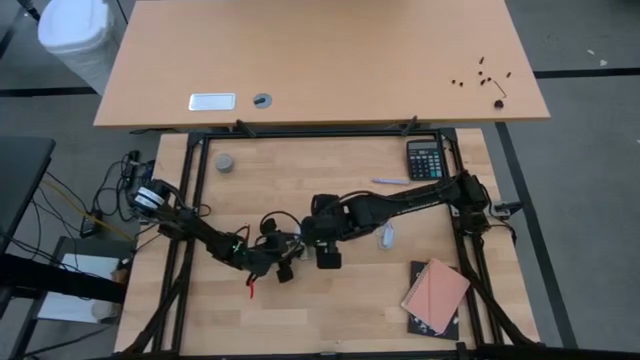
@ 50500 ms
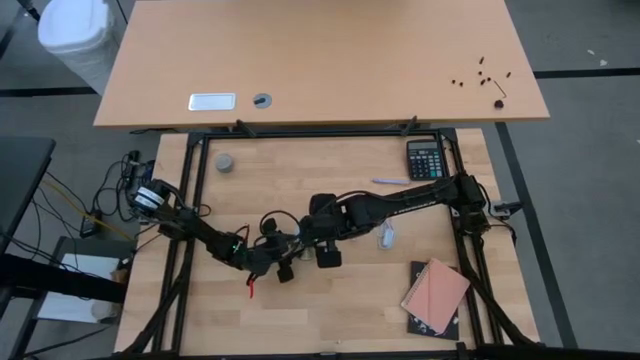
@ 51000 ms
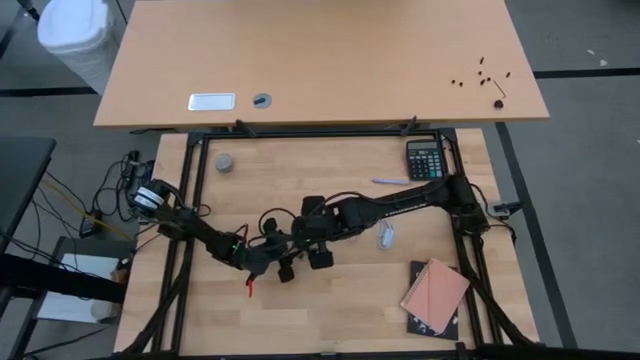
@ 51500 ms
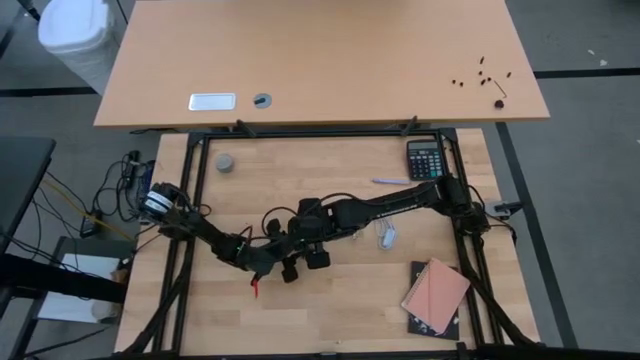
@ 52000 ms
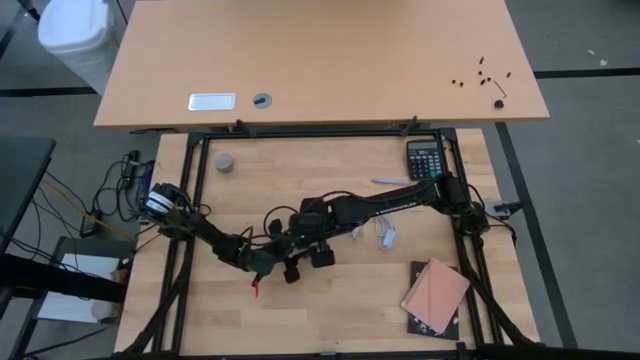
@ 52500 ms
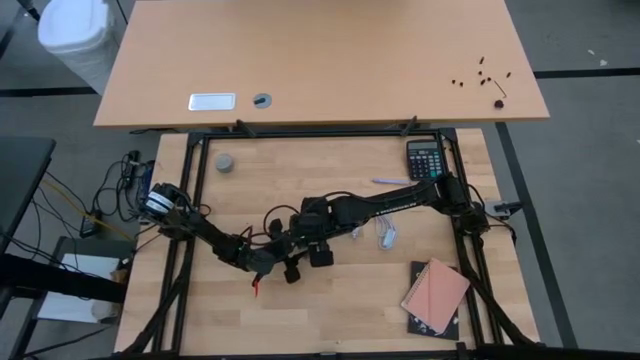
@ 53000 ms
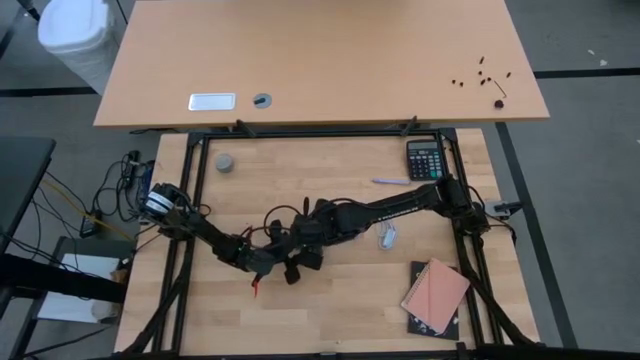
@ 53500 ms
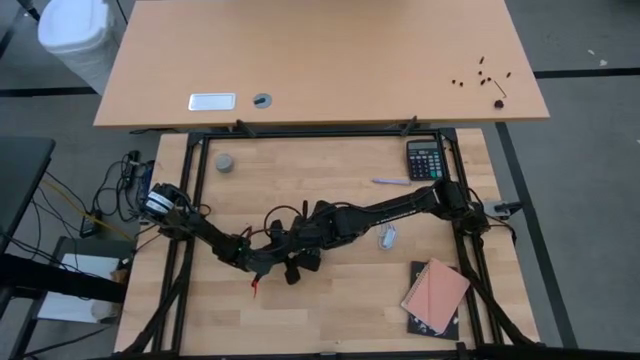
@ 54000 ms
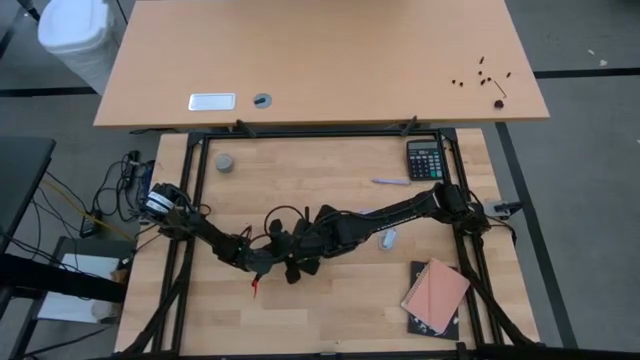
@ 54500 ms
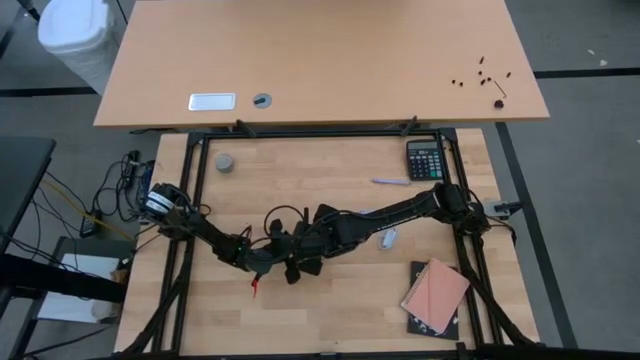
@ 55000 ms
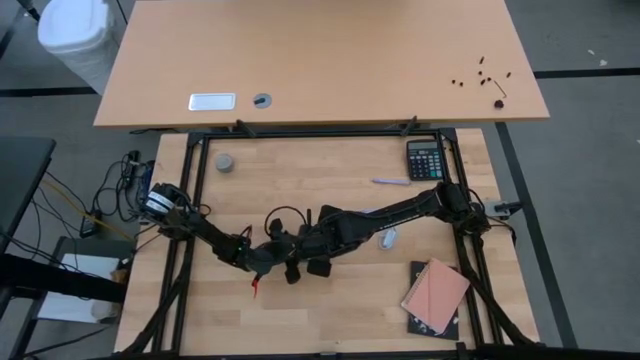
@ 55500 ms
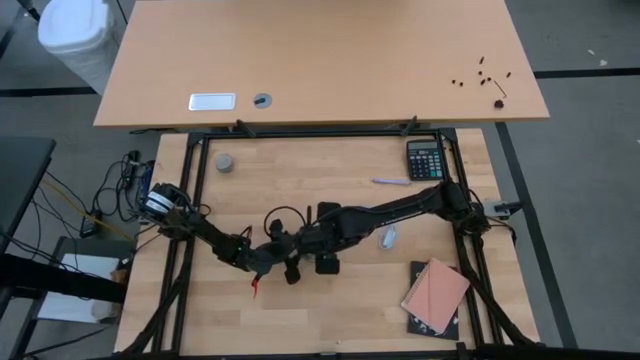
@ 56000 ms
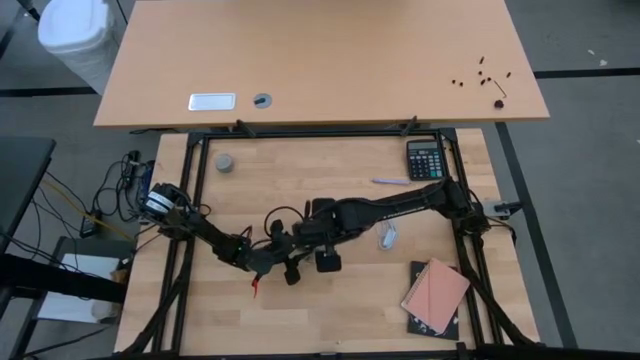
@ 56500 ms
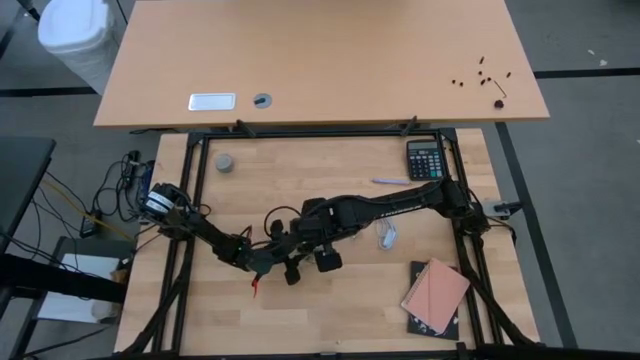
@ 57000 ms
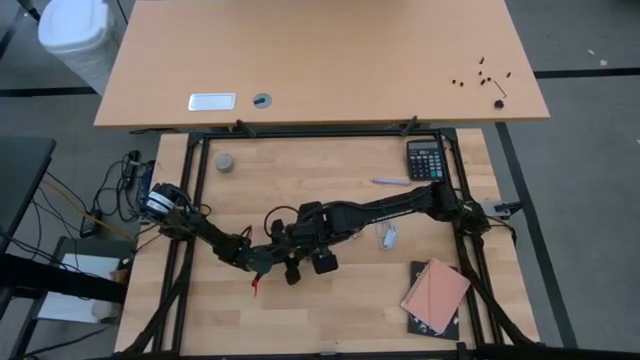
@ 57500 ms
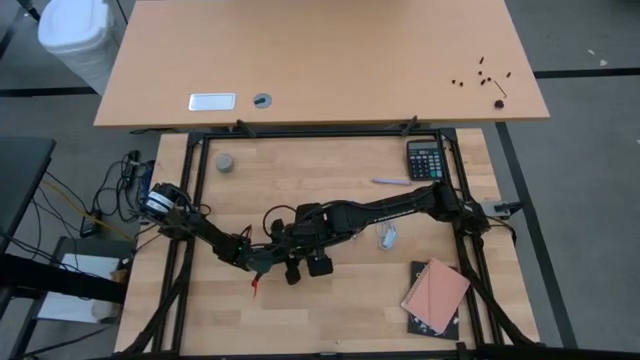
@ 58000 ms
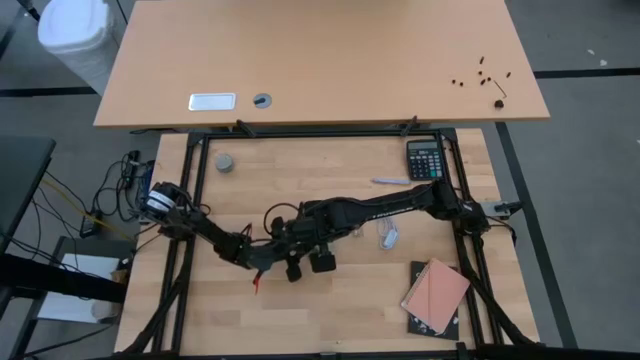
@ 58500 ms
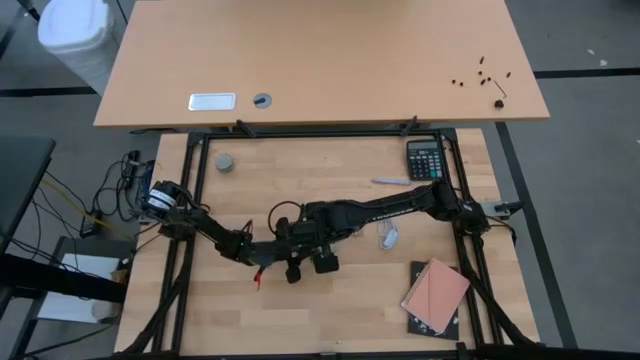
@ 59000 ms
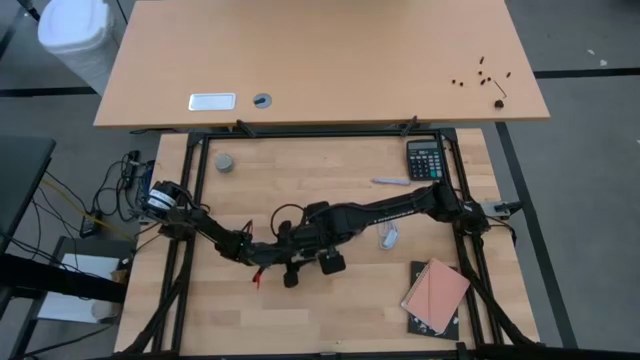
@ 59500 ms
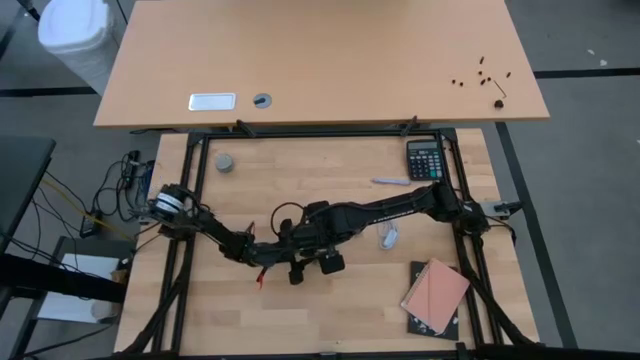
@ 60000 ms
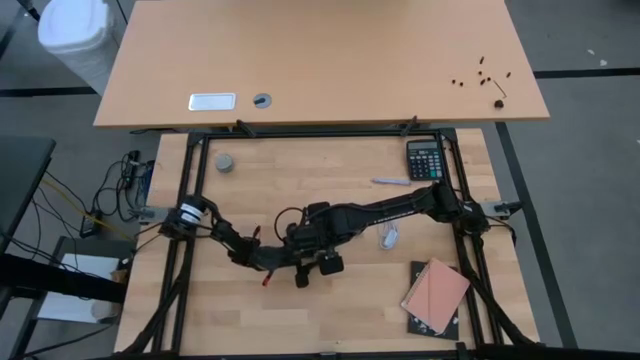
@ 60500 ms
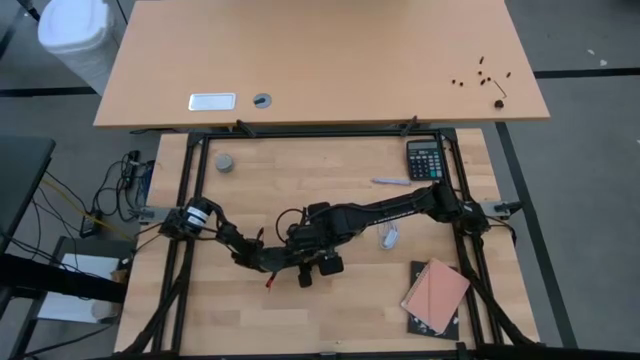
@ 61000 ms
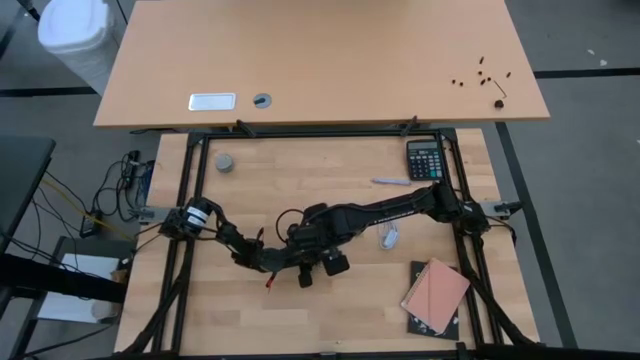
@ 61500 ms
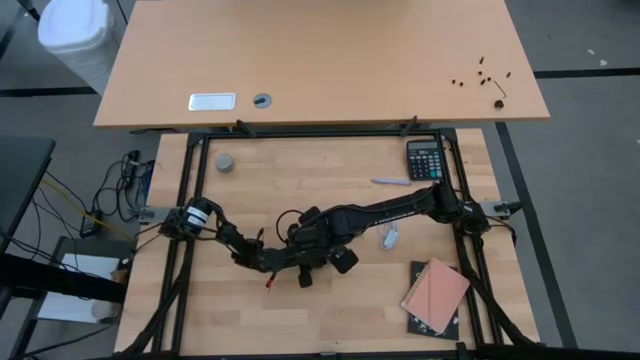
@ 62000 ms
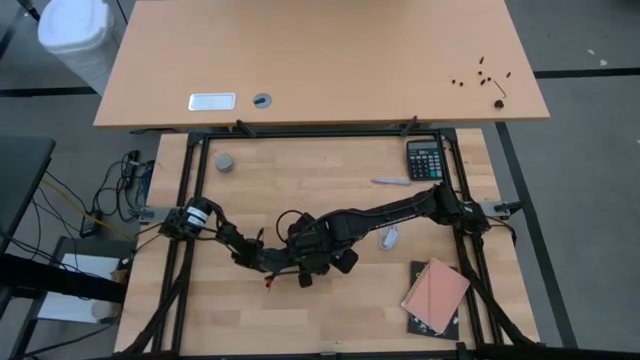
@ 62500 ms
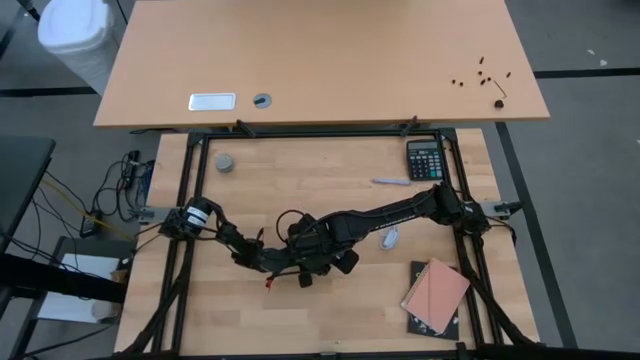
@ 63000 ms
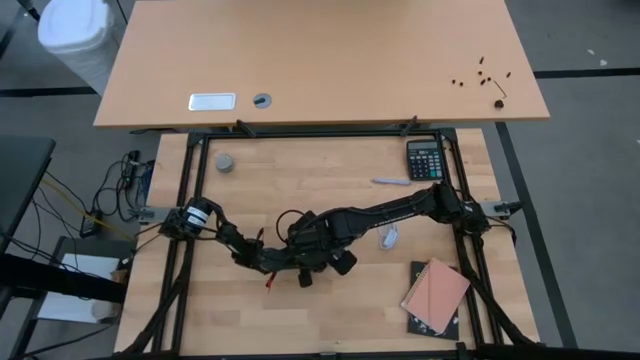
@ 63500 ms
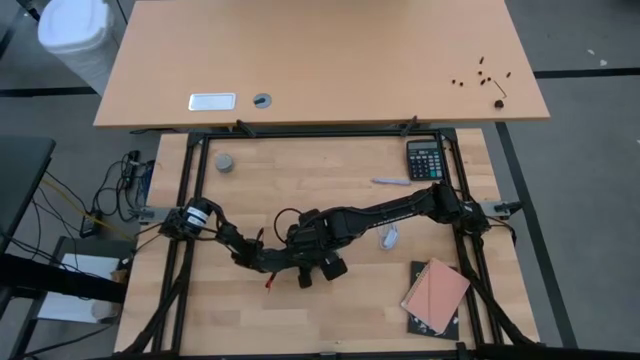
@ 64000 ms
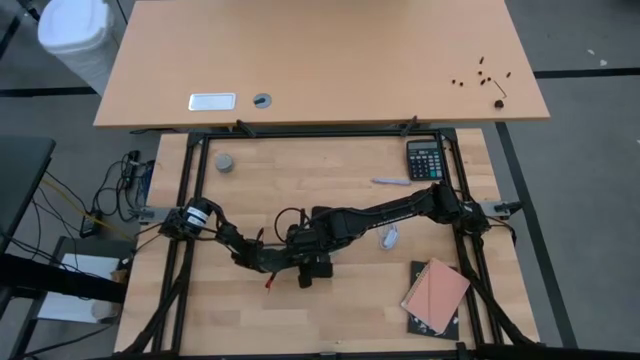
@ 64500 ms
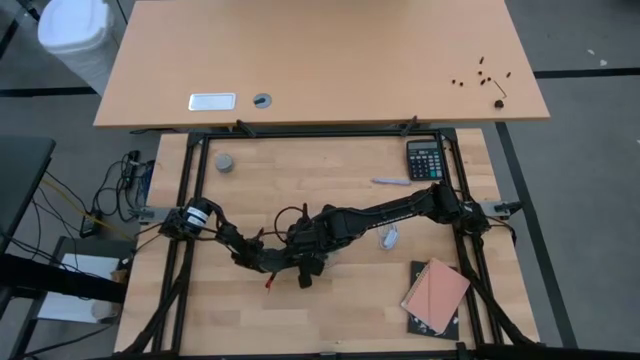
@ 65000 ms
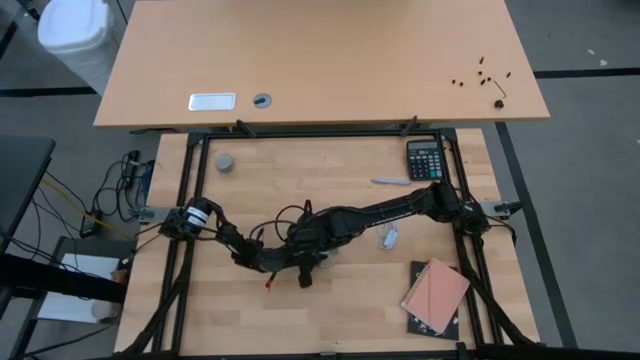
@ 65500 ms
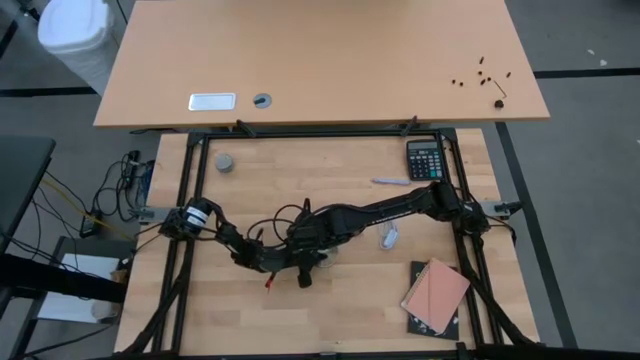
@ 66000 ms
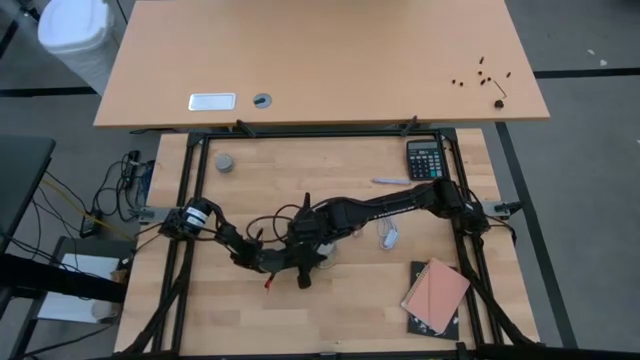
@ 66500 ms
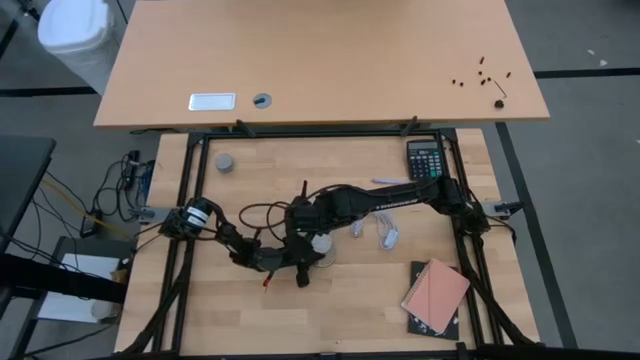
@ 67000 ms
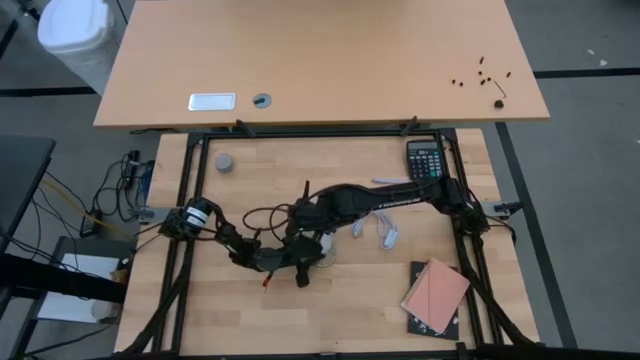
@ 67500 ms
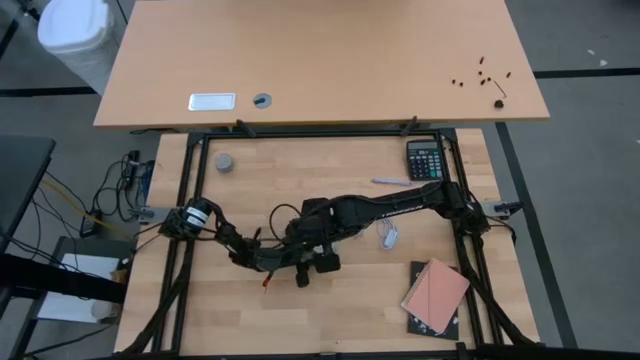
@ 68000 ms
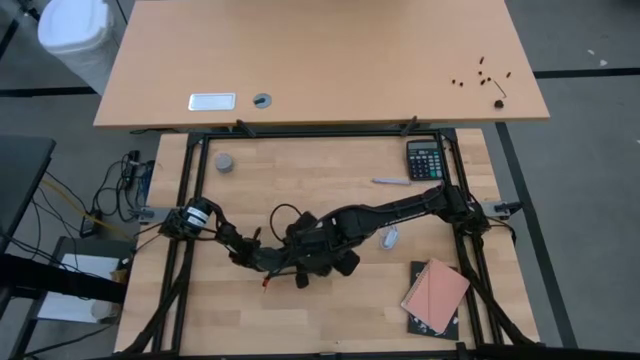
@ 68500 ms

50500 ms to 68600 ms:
Task: Screw lightbulb
Insert the lightbulb into the bronze lamp socket

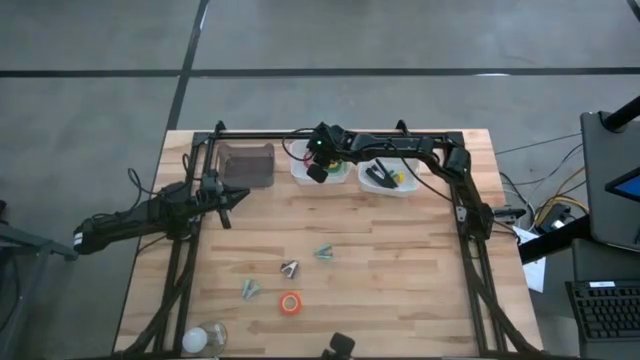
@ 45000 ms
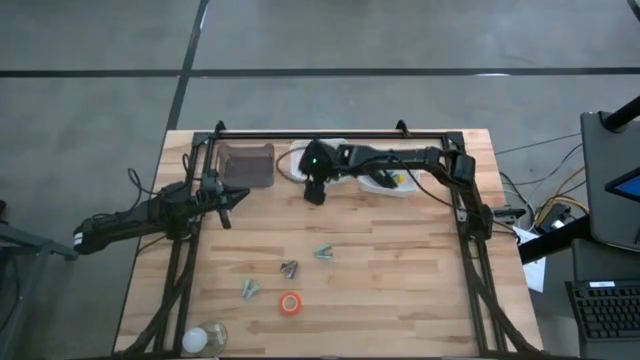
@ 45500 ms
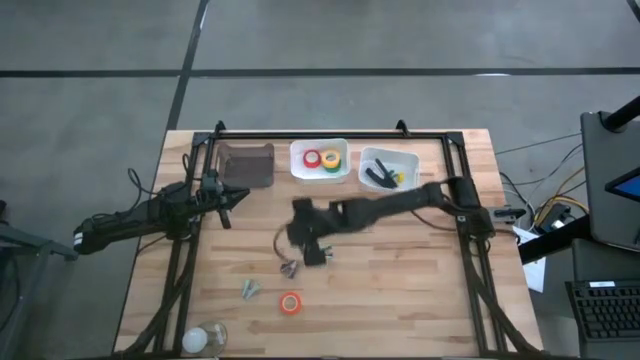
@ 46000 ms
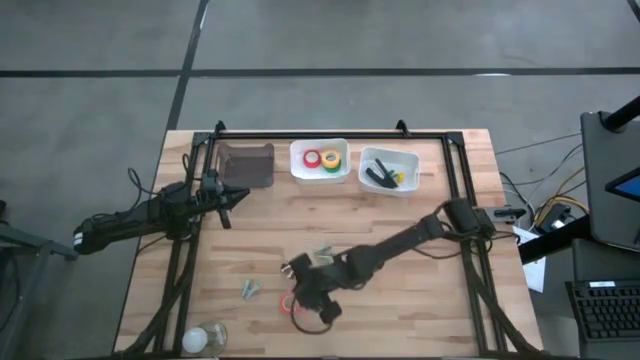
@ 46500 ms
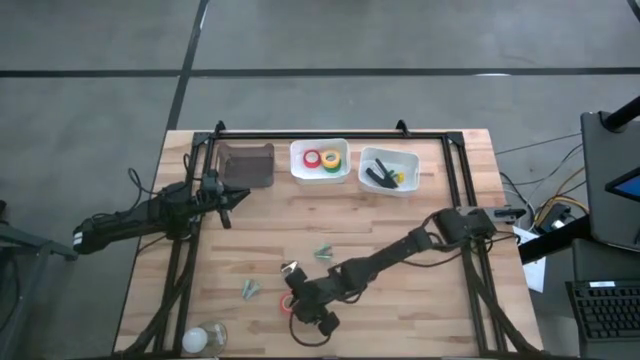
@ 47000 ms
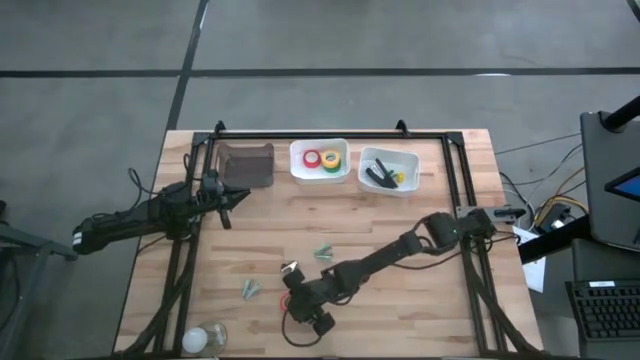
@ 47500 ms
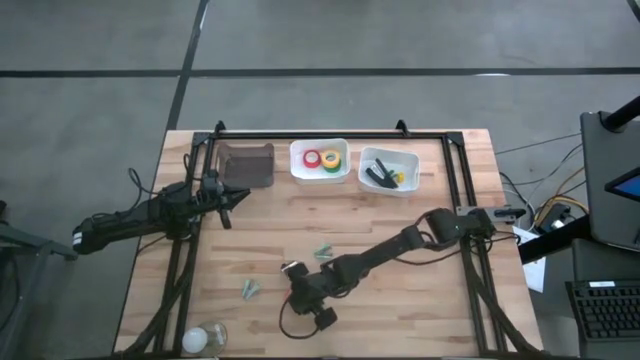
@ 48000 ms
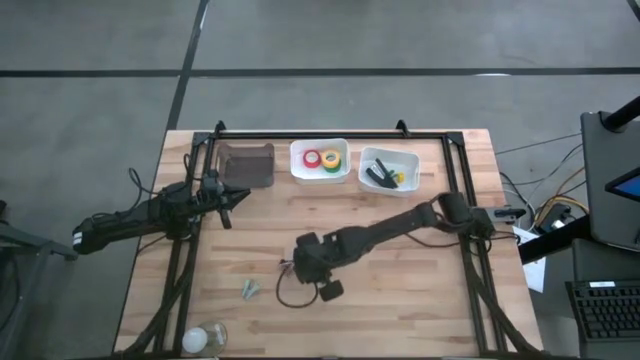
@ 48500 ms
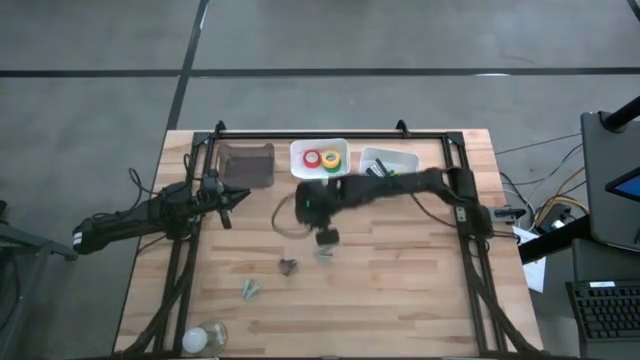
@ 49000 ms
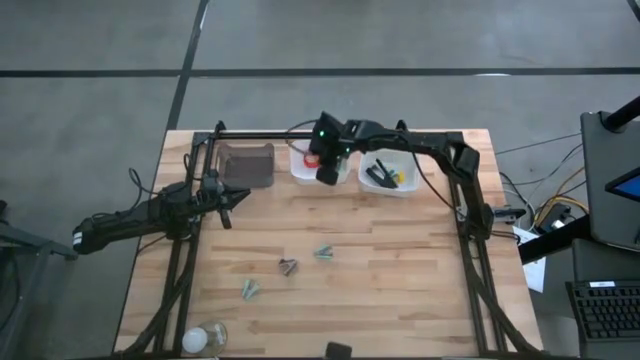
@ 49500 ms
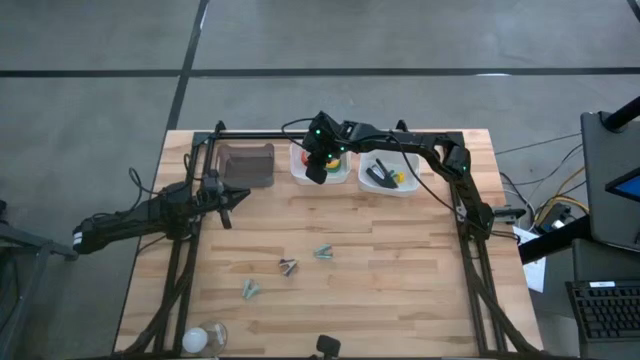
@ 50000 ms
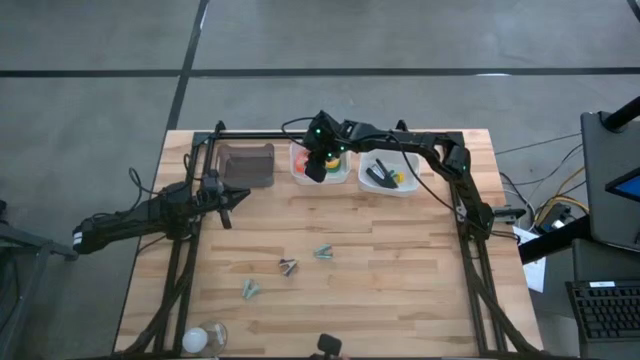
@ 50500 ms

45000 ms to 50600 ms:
Task: Pick and place Stapler, Stapler remover, tape
Put the orange tape into the left white bin
